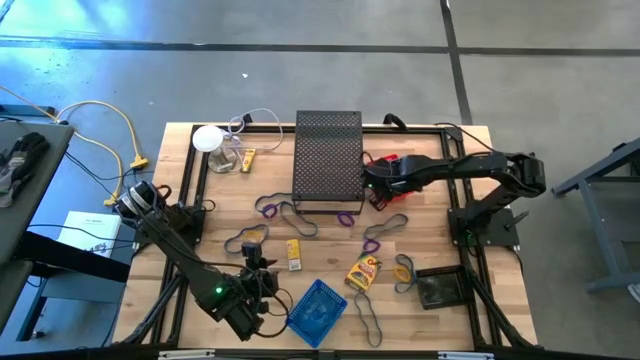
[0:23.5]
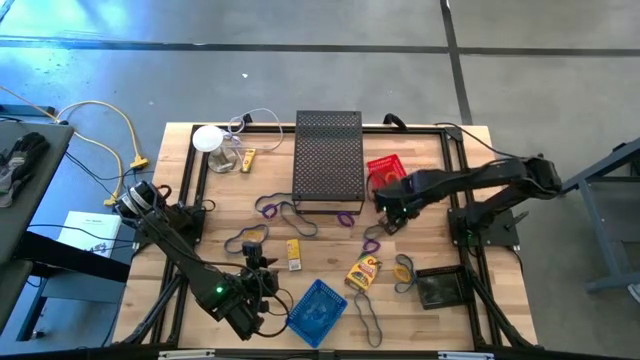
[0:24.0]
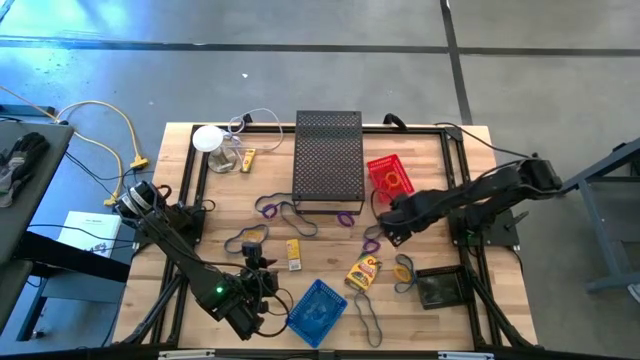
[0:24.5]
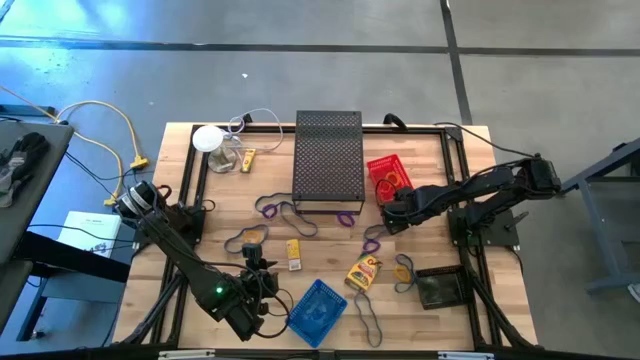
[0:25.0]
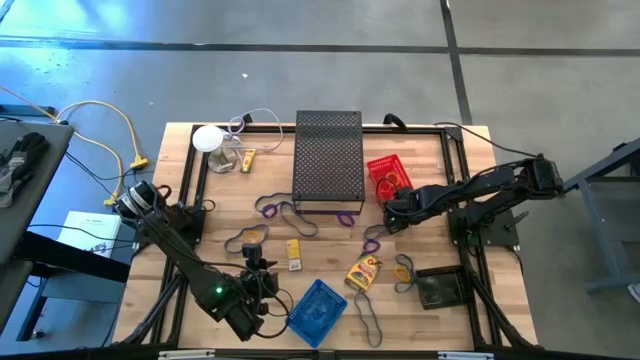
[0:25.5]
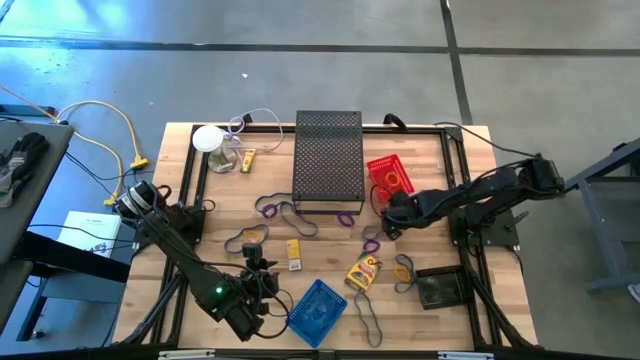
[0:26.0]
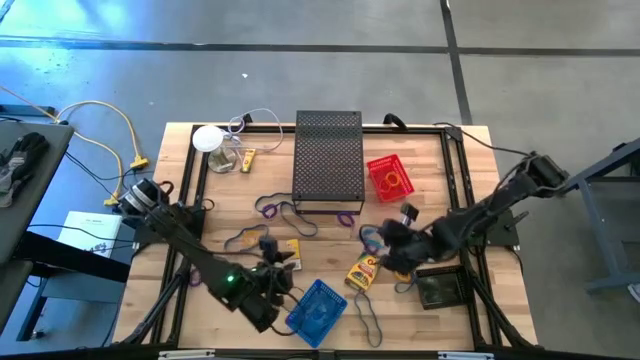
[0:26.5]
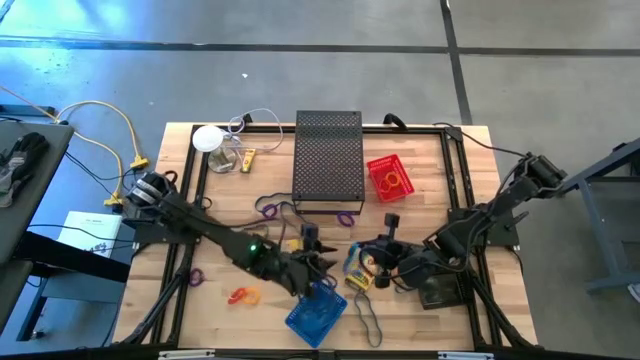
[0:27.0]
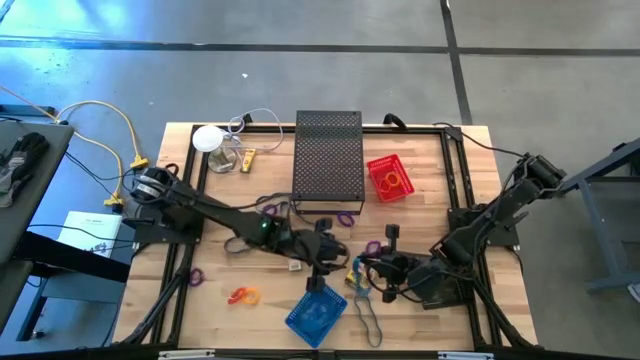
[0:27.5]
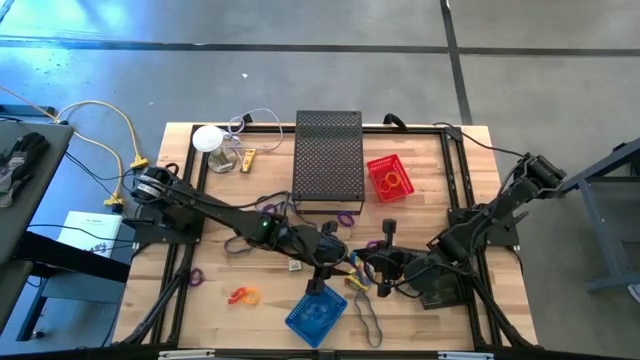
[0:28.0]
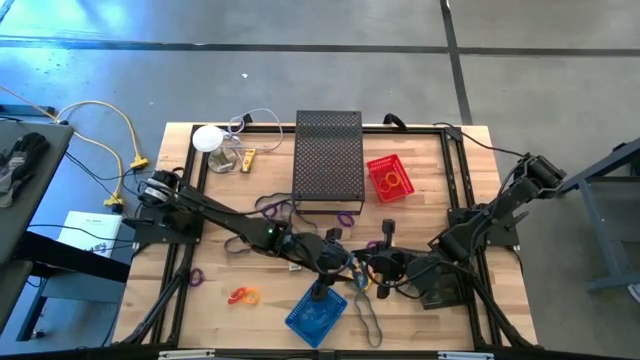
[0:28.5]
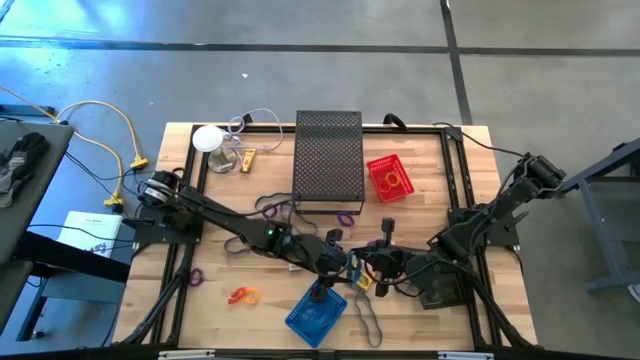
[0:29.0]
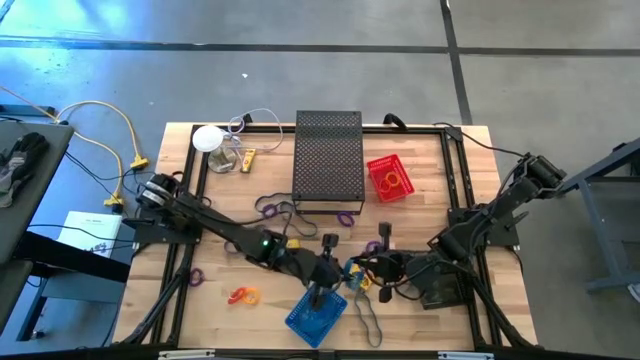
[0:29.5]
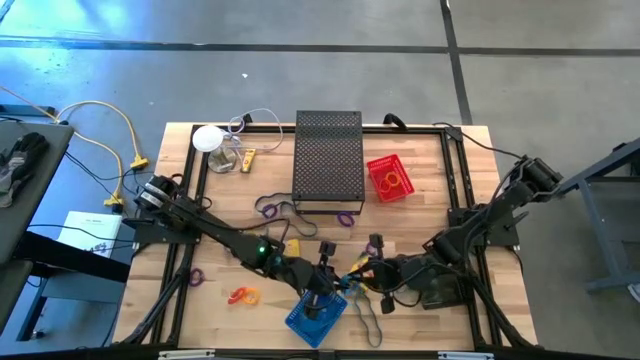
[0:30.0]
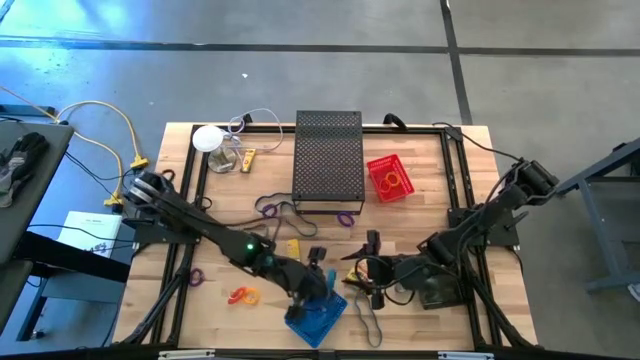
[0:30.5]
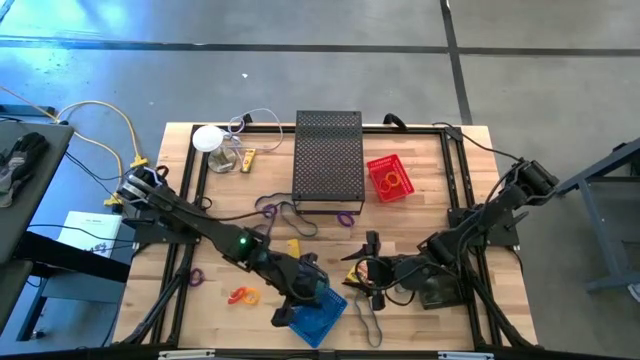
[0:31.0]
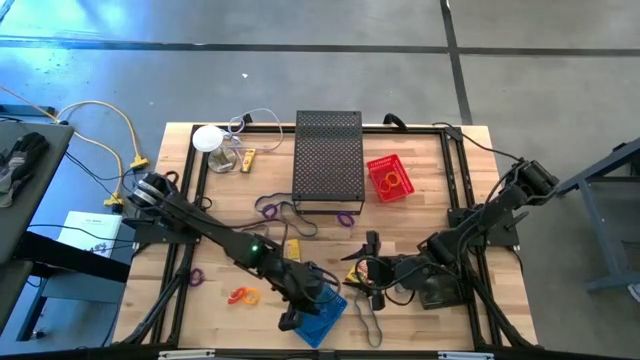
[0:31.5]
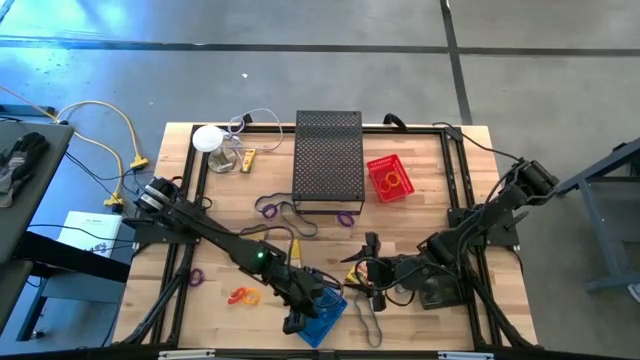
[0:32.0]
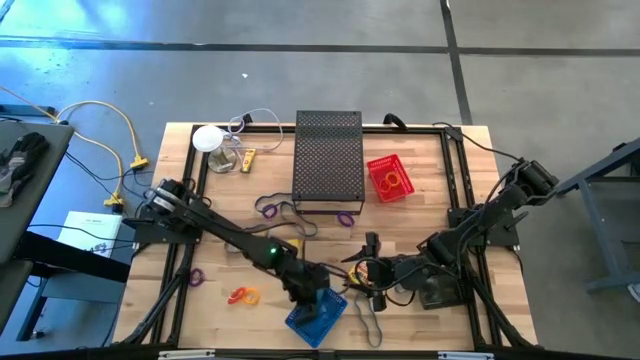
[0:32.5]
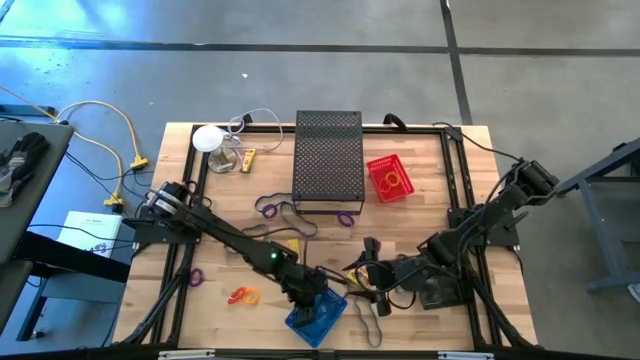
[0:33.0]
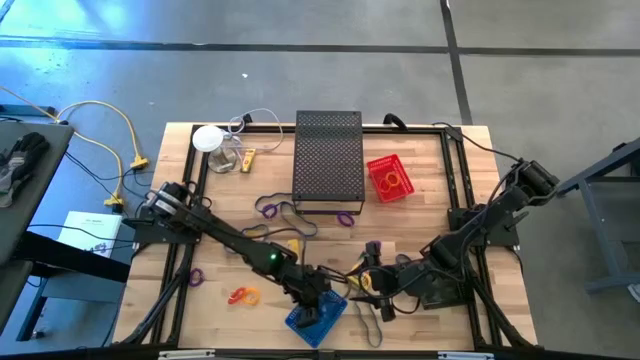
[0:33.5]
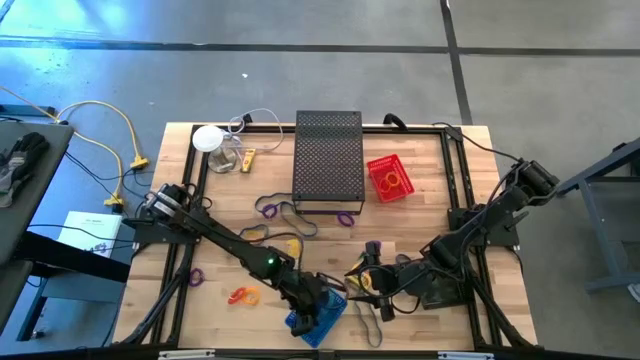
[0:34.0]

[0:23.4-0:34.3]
Task: Pick & Place Office Desk Supplies
Put the blue rubber band into the blue bin

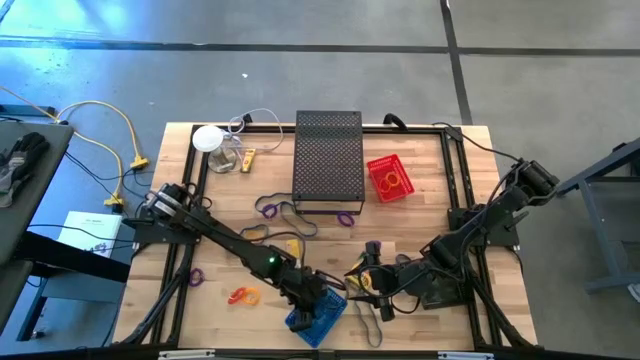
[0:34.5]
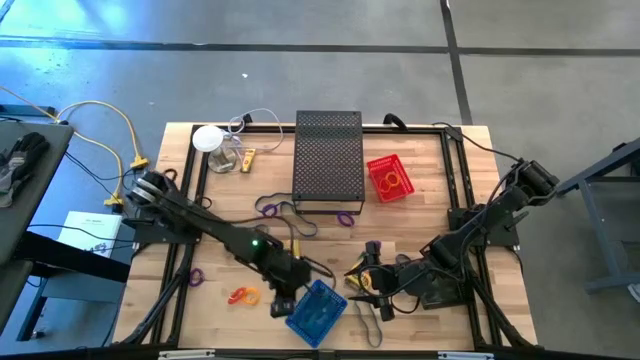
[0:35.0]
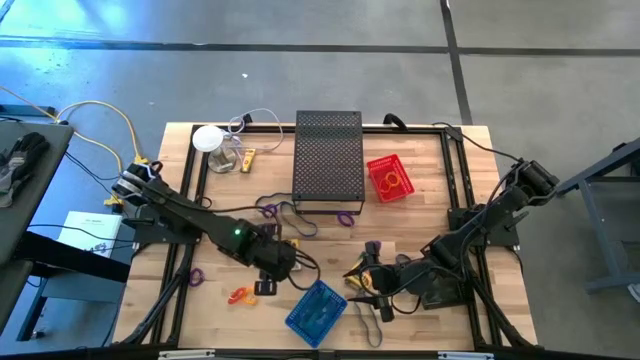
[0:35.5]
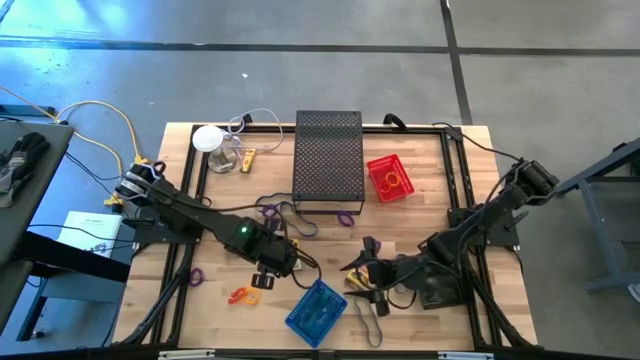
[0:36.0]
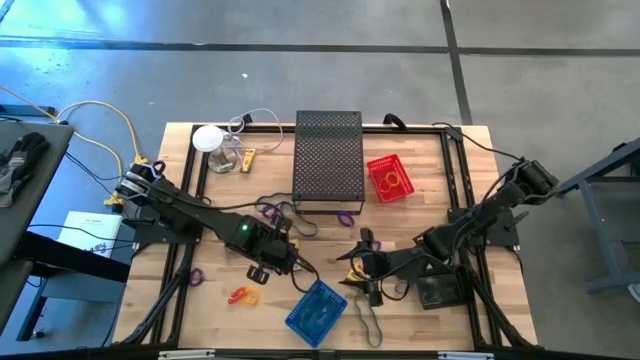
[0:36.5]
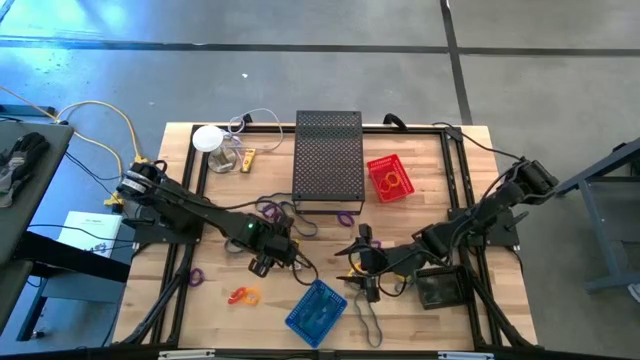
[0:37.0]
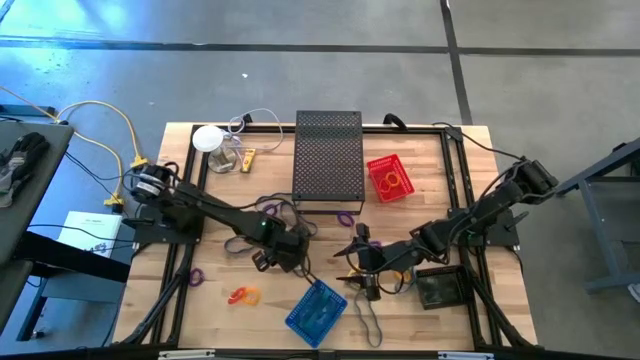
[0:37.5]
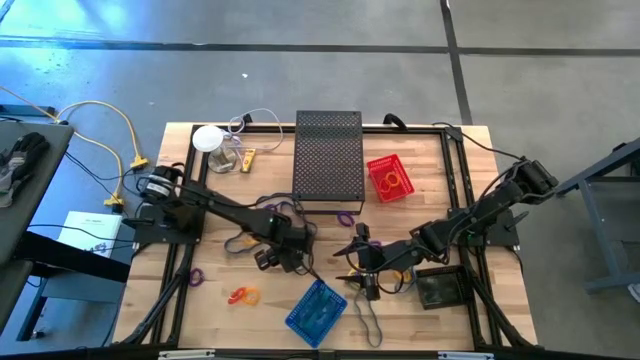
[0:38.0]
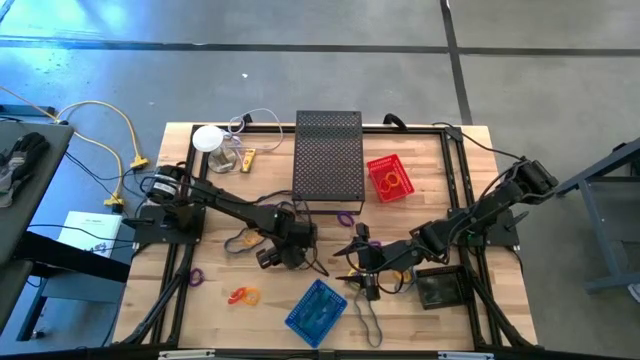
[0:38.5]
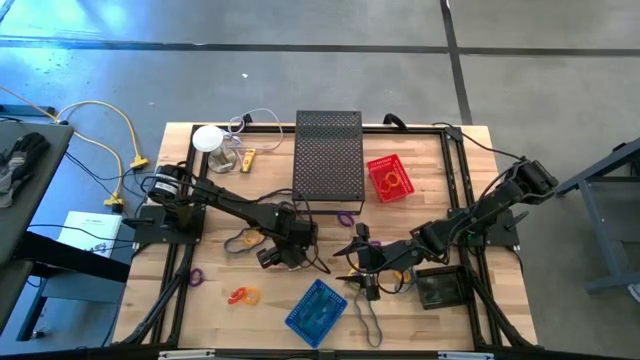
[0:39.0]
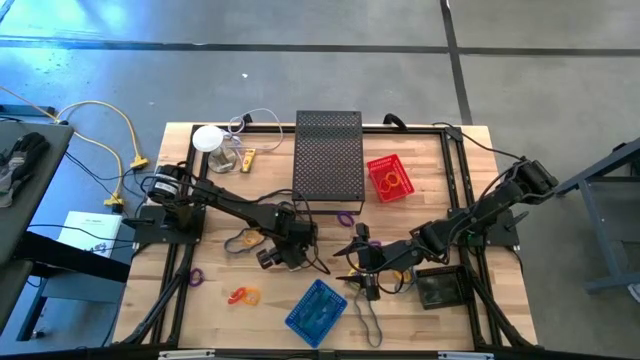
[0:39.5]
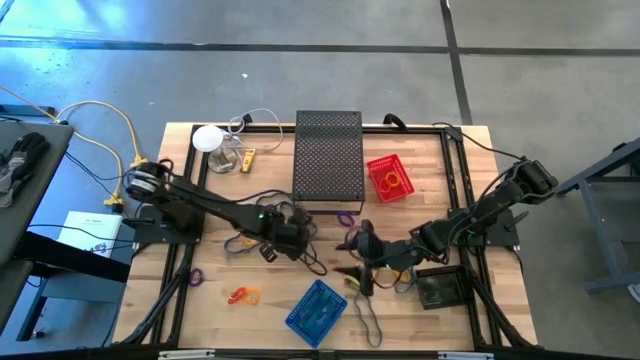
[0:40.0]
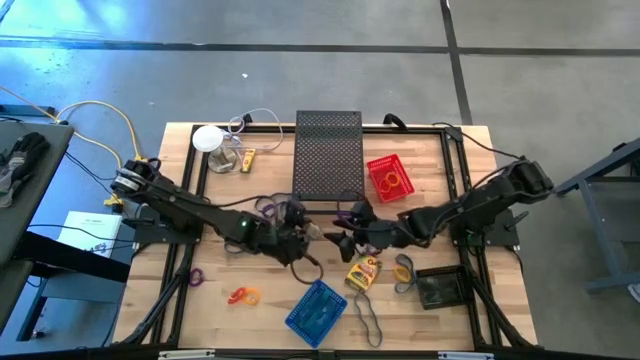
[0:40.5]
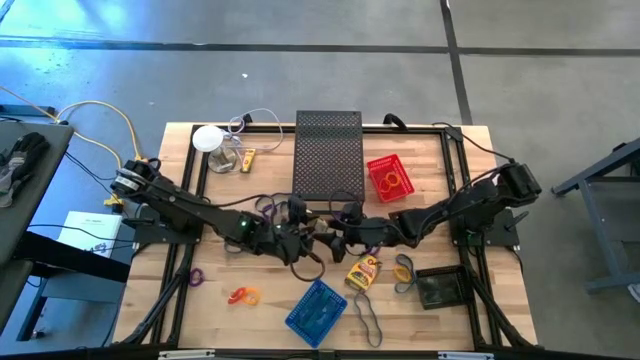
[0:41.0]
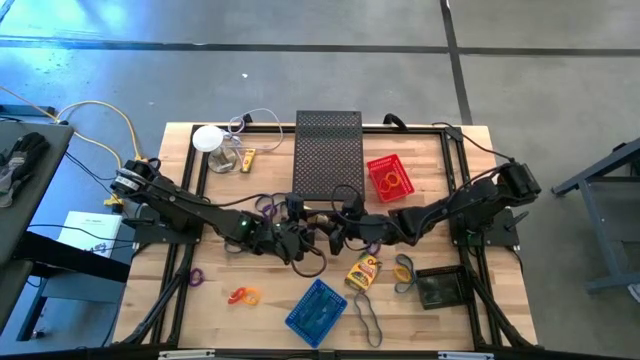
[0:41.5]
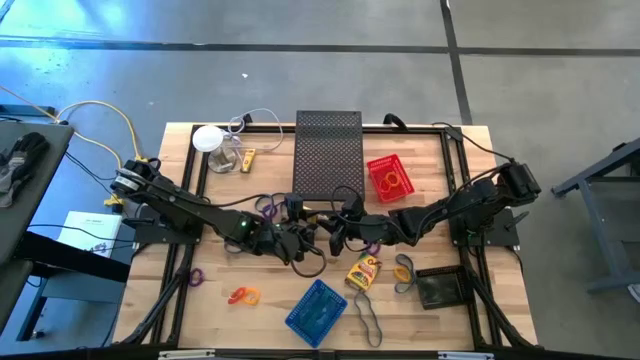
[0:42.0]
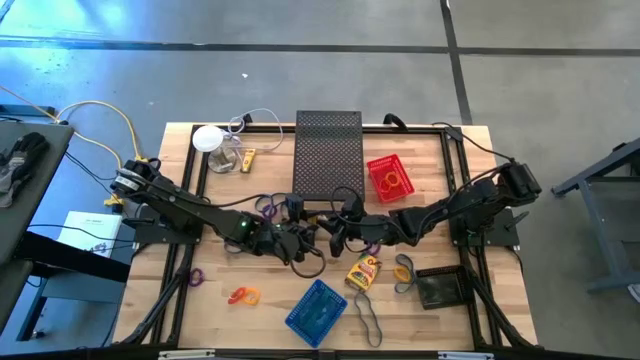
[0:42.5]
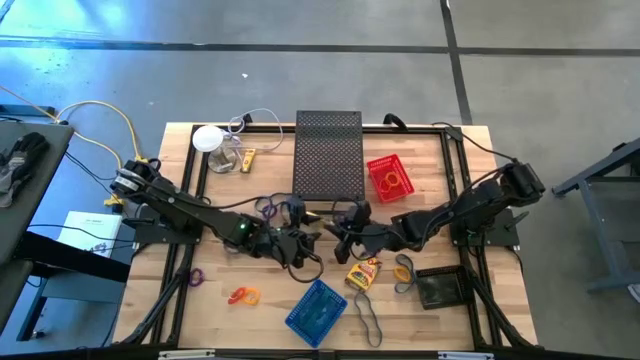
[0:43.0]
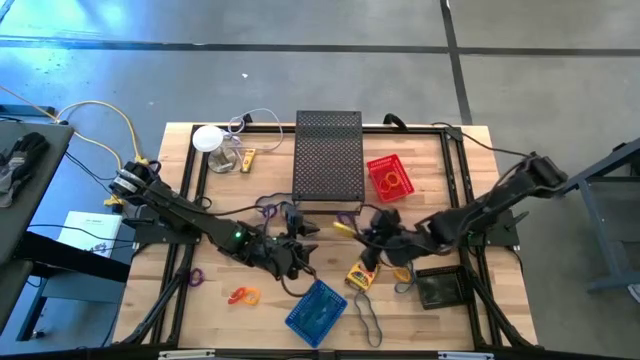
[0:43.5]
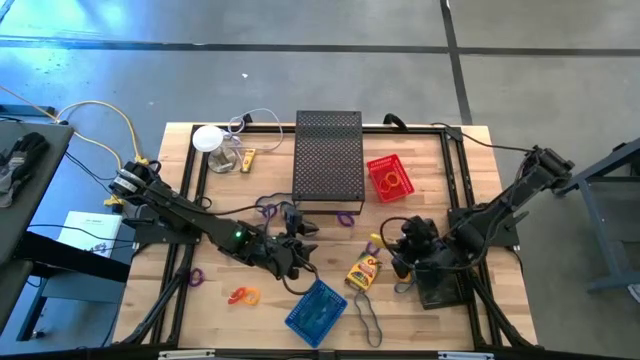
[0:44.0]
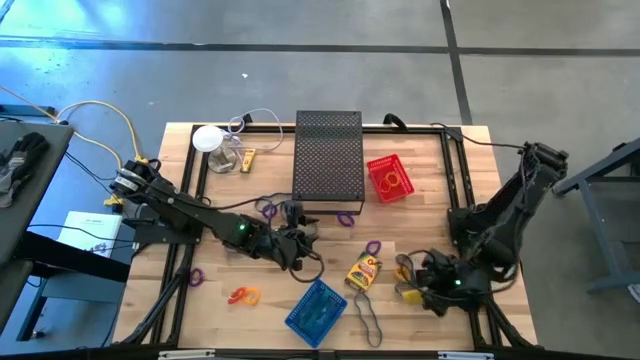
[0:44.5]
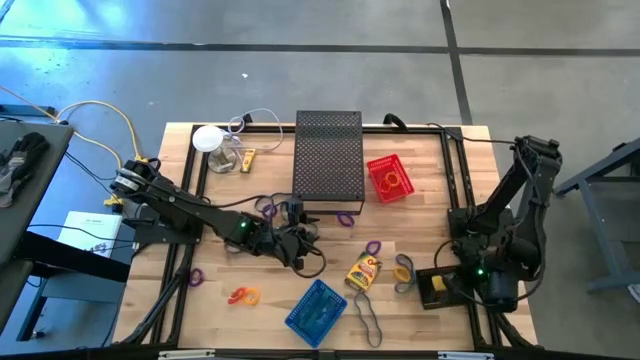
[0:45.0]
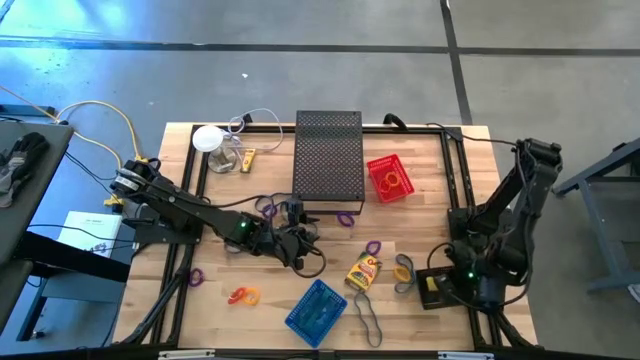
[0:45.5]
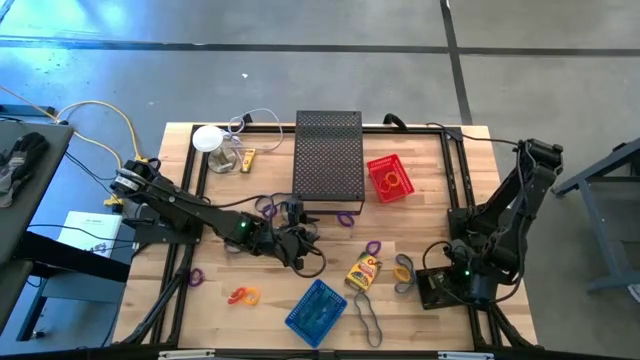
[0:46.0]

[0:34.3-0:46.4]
Put the crayon box into the black bin
